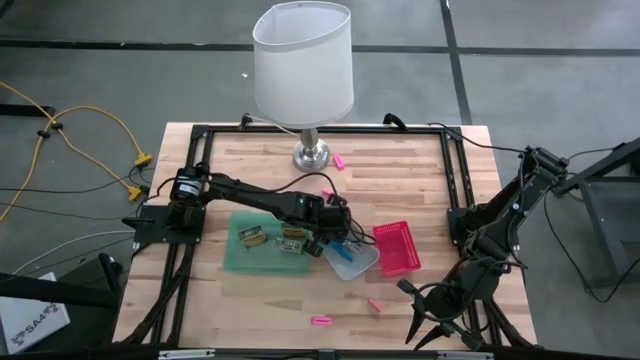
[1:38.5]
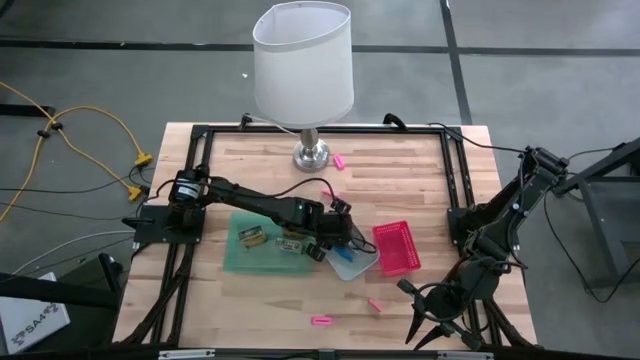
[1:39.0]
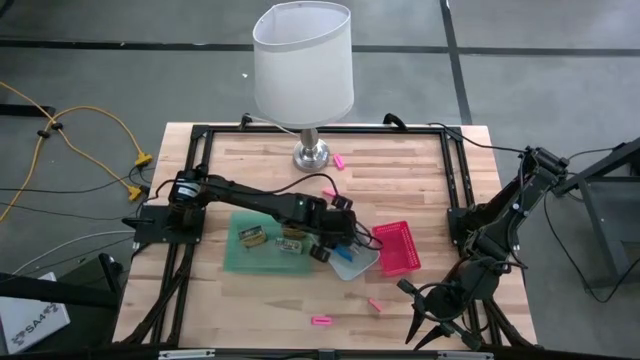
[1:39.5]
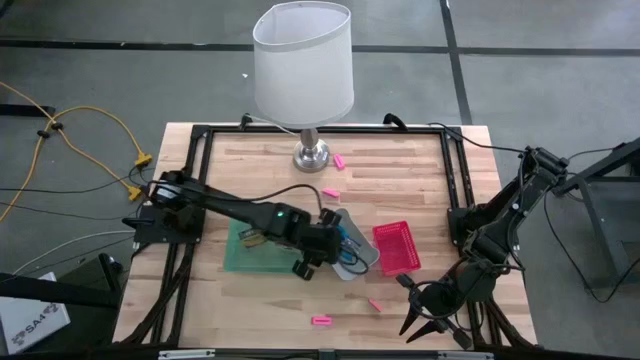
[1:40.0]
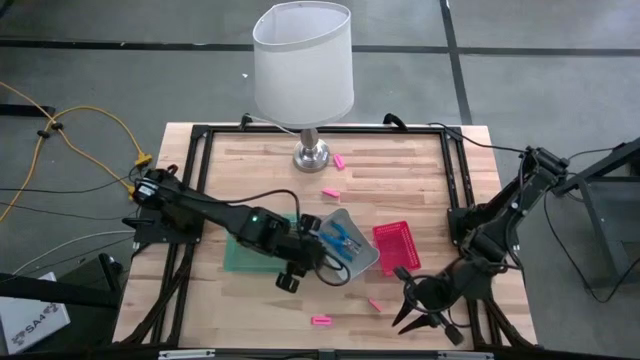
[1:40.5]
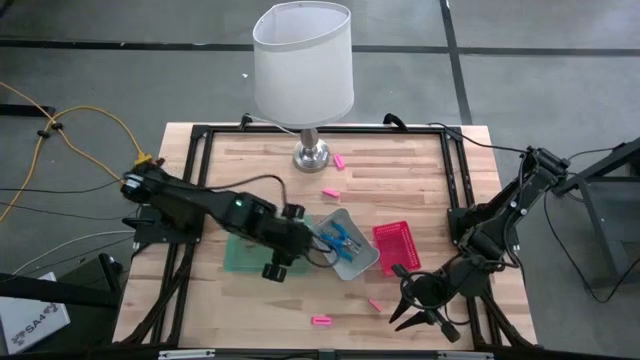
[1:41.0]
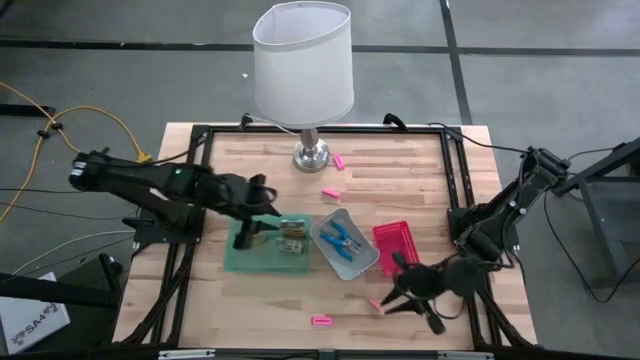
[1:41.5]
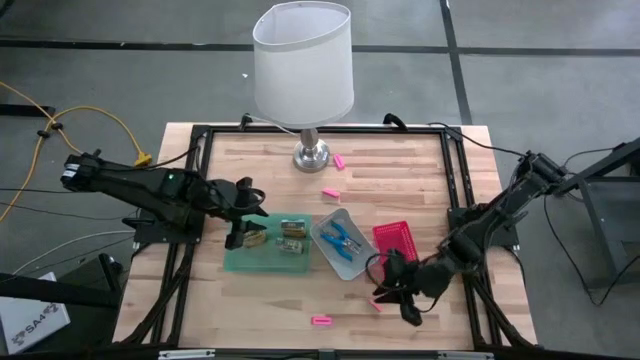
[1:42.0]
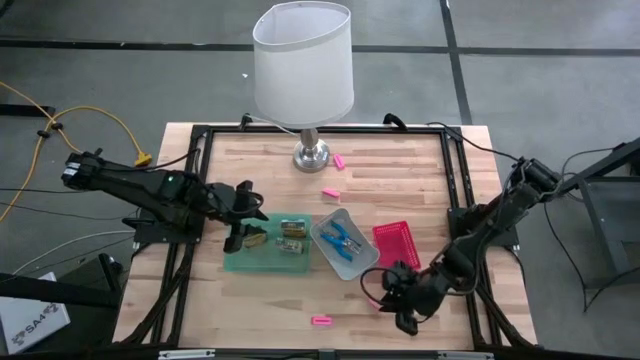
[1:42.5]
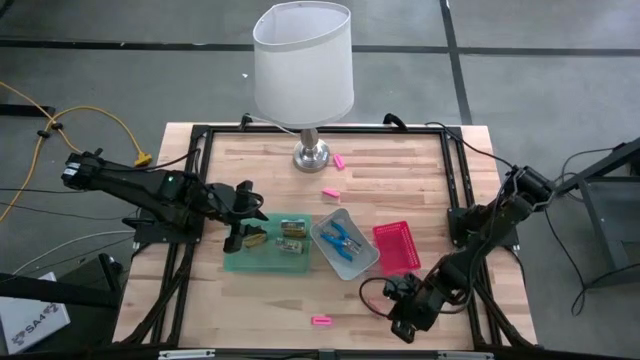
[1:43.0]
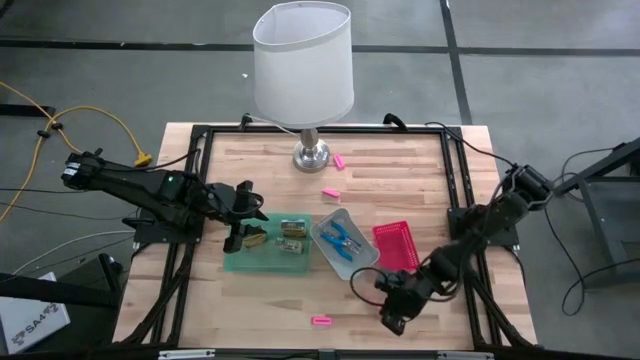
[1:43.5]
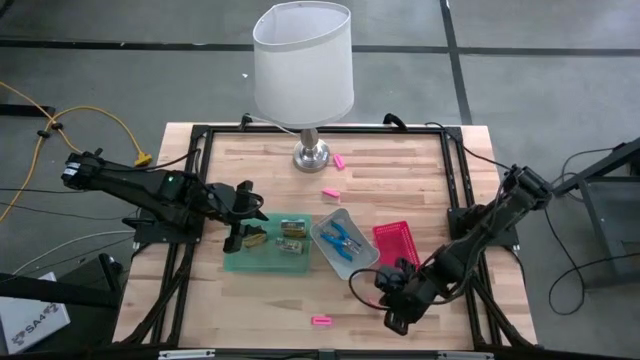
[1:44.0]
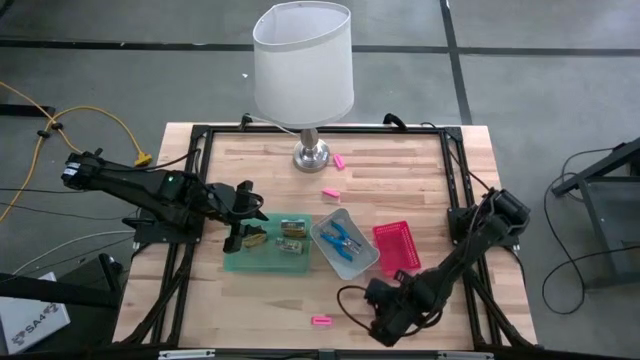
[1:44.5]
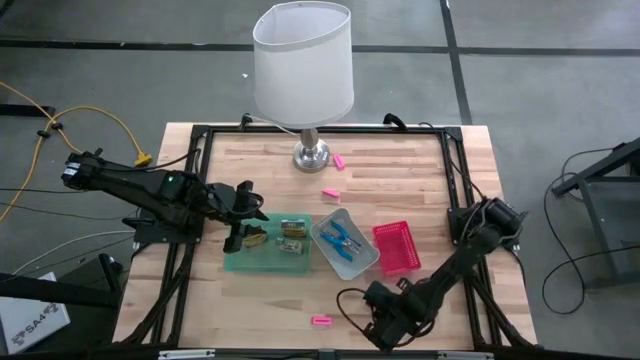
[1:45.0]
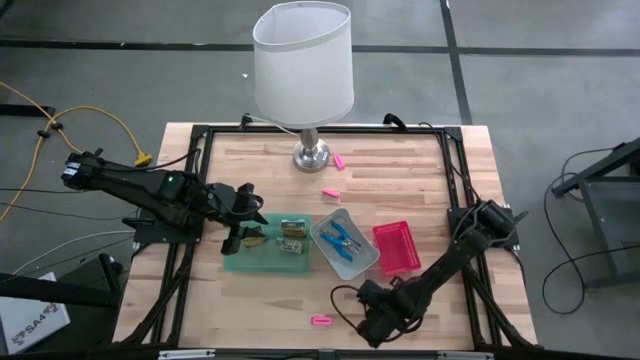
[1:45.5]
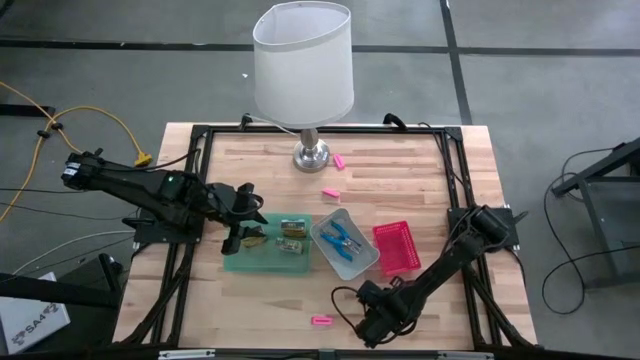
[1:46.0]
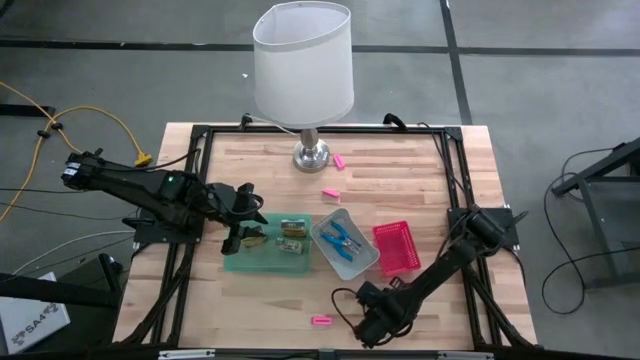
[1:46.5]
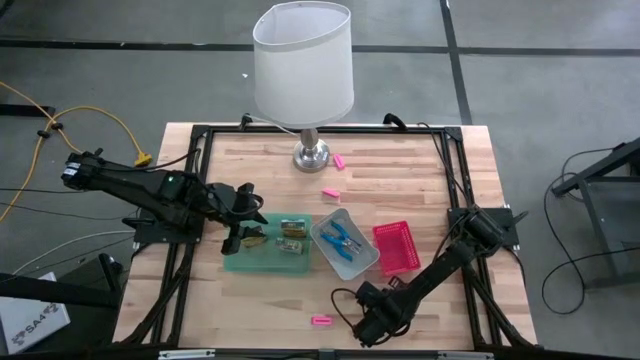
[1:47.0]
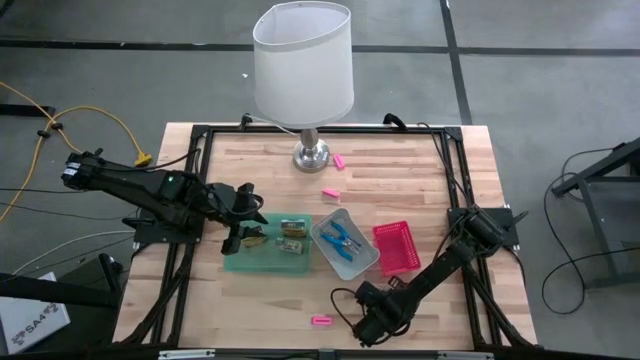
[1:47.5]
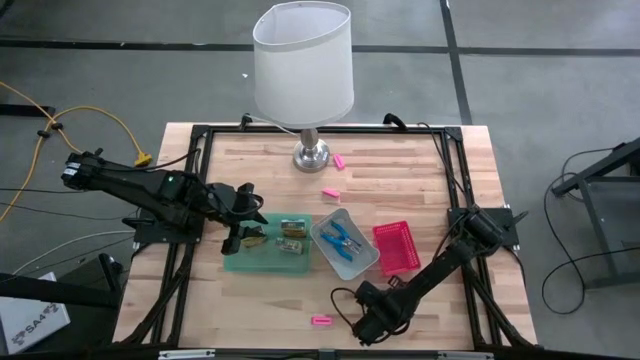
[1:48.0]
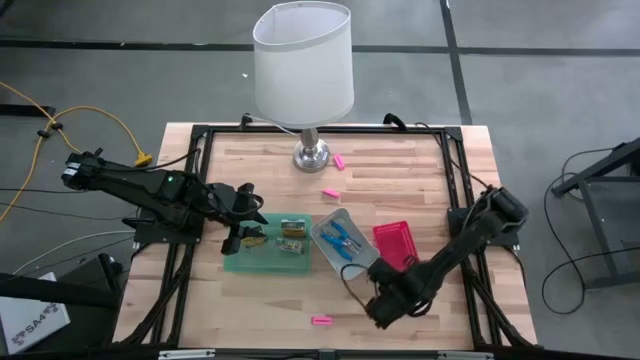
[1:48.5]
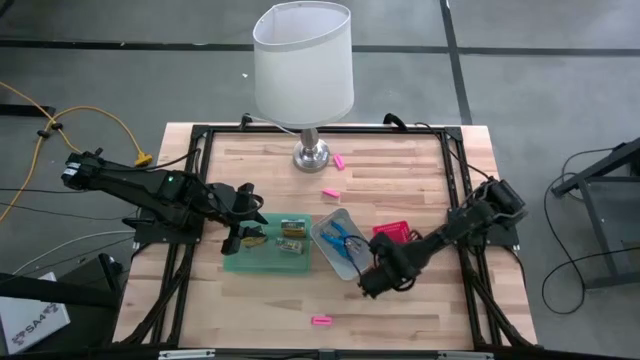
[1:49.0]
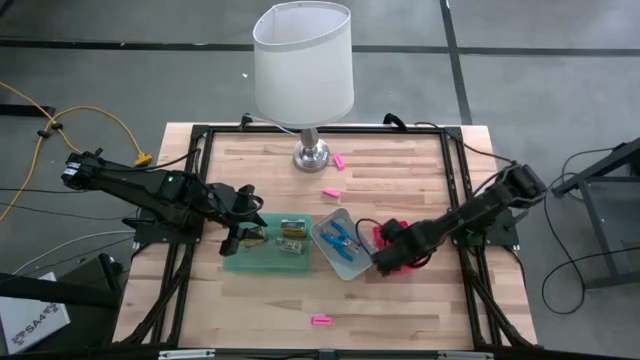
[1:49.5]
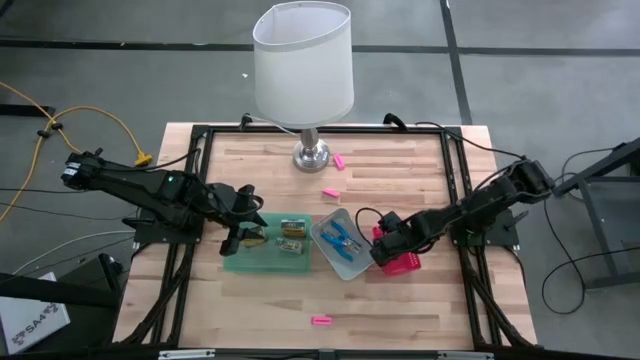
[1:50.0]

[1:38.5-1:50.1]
Task: Pick & Place School Supplies
Put the pink eraser into the red bin

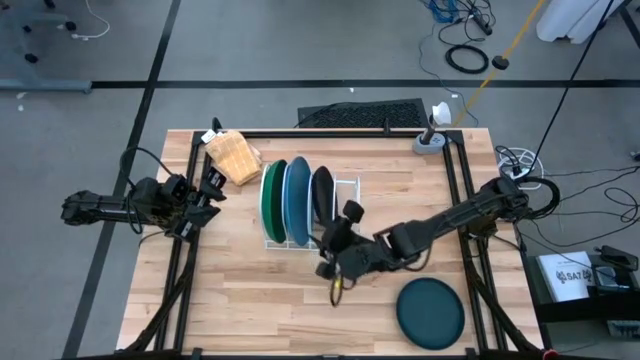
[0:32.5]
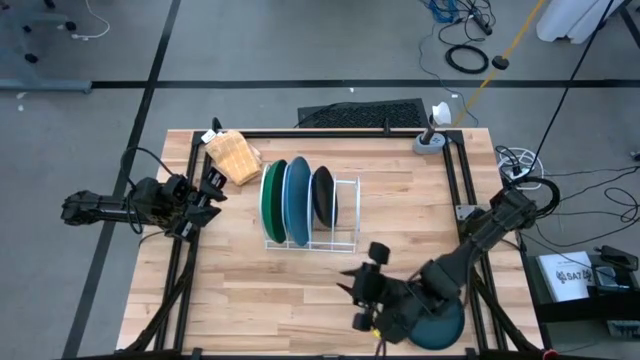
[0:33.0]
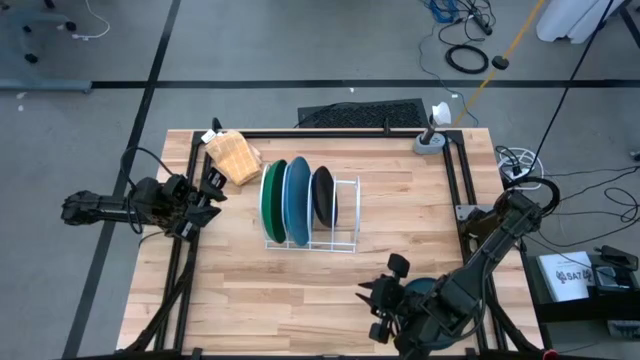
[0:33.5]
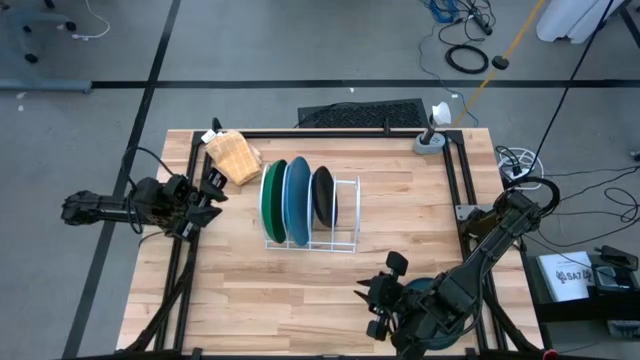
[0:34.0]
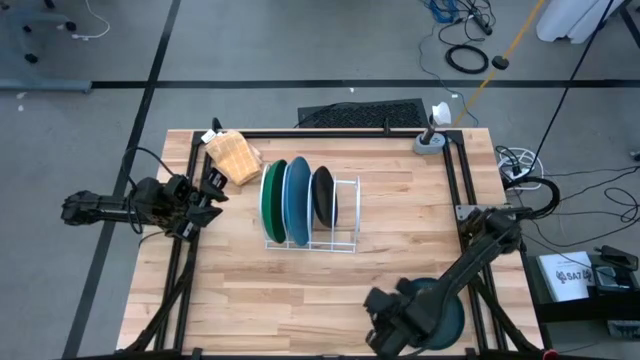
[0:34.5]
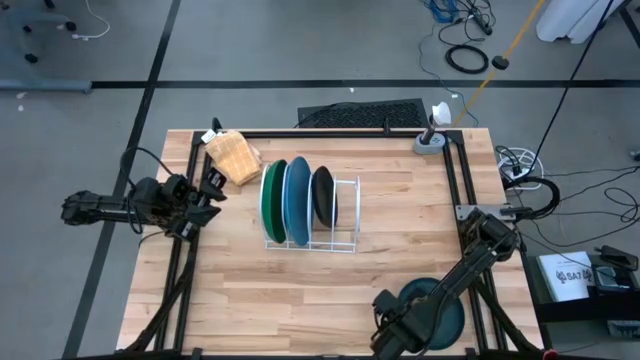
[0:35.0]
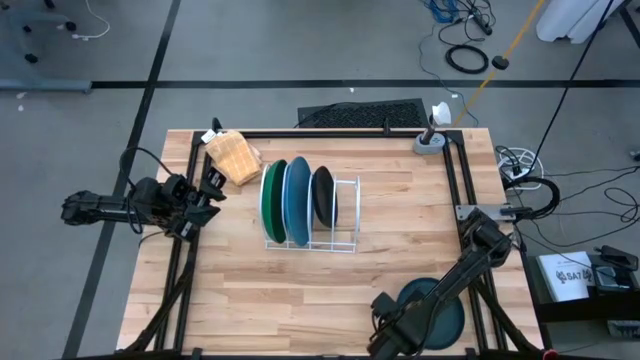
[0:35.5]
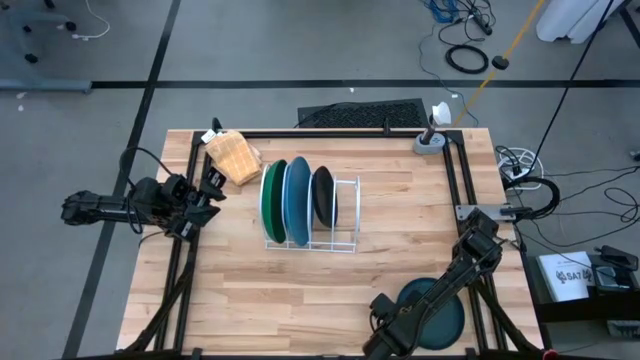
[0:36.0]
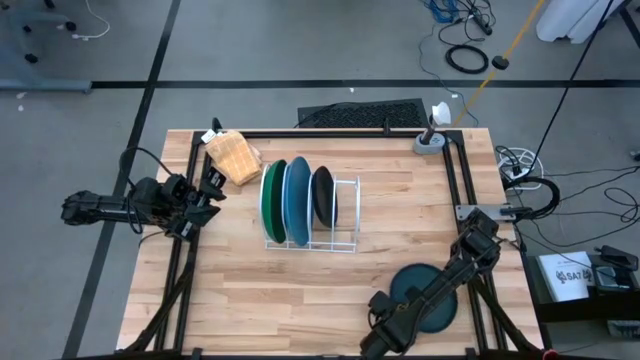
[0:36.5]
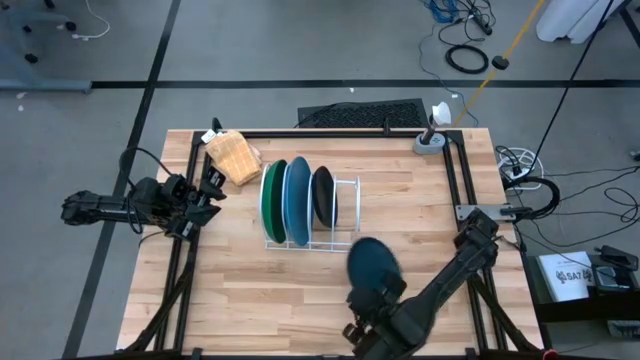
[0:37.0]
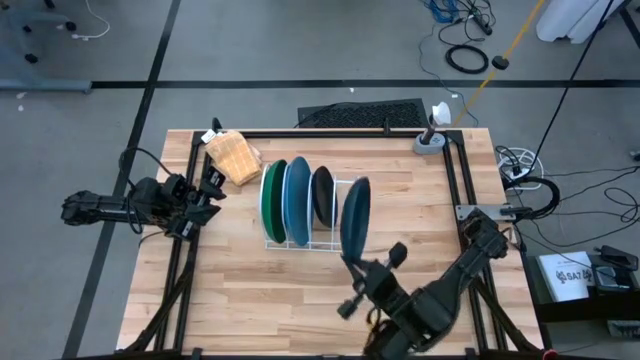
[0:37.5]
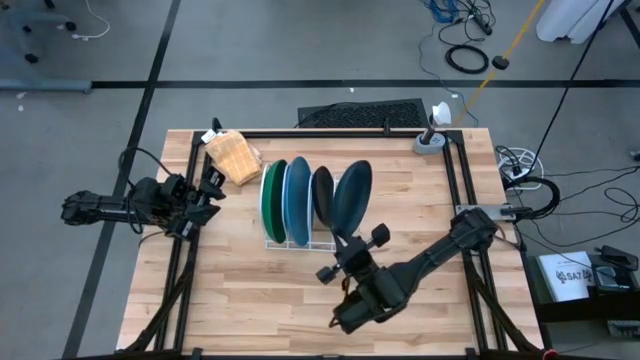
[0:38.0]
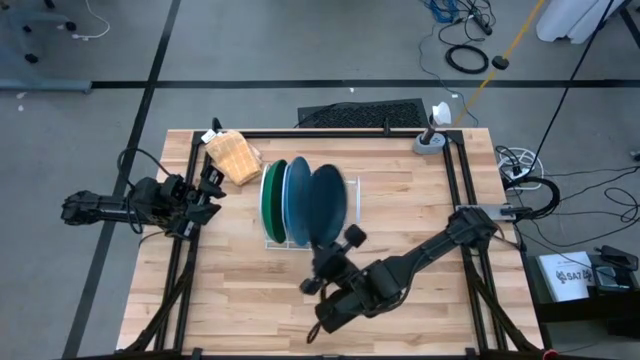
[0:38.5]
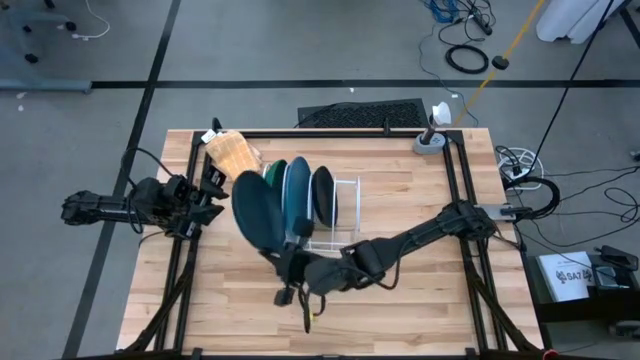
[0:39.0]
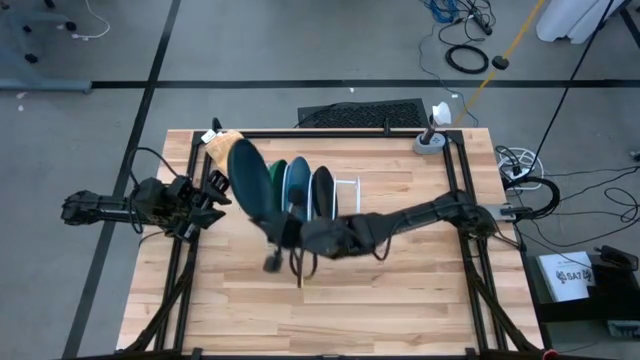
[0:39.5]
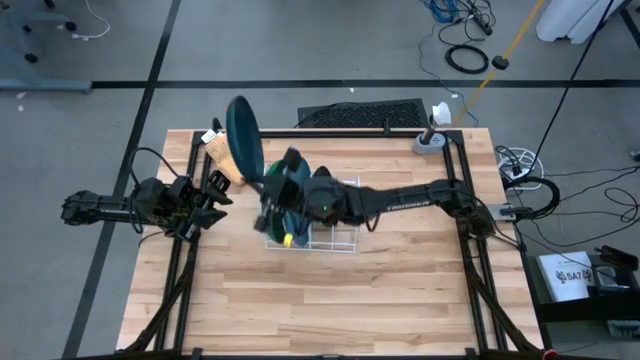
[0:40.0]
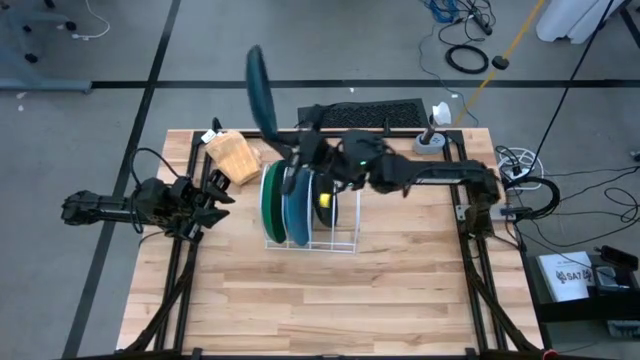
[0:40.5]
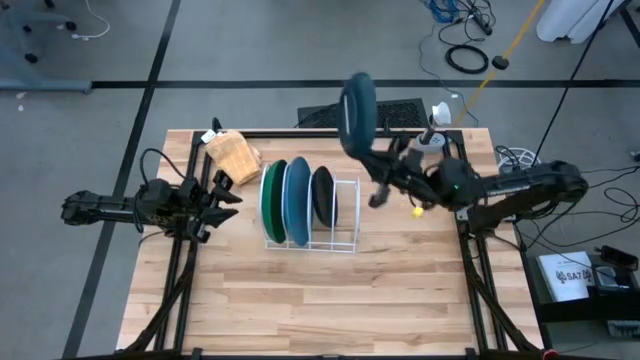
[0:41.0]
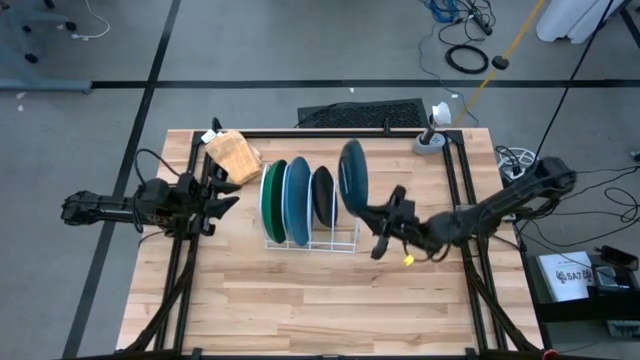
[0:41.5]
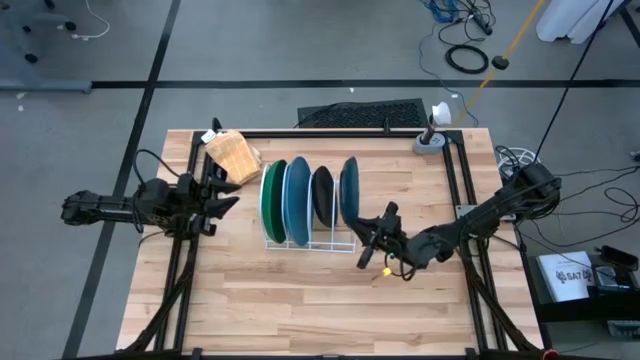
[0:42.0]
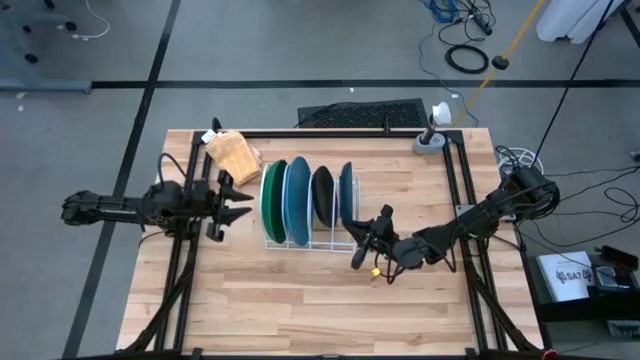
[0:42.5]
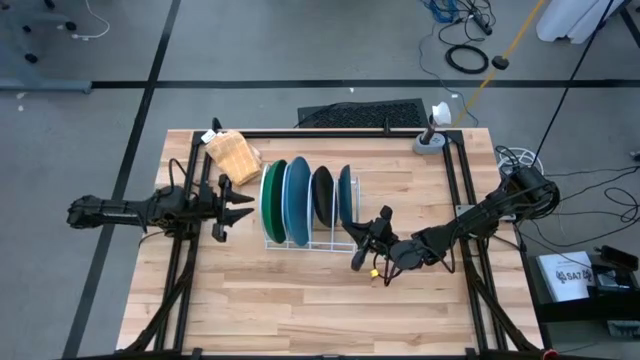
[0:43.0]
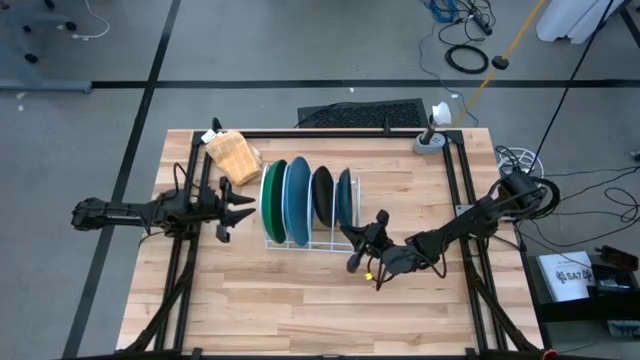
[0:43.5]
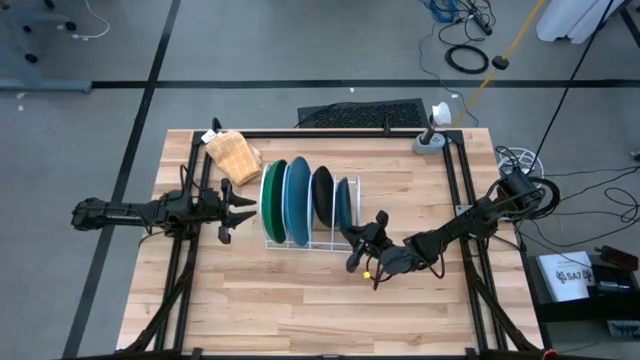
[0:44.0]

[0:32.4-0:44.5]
Task: Sort dishes
Put the dark blue plate in the dish rack
